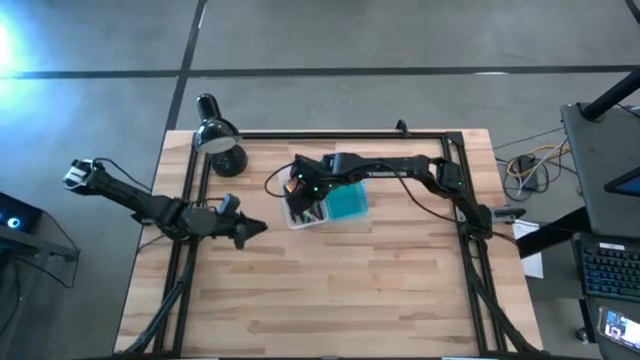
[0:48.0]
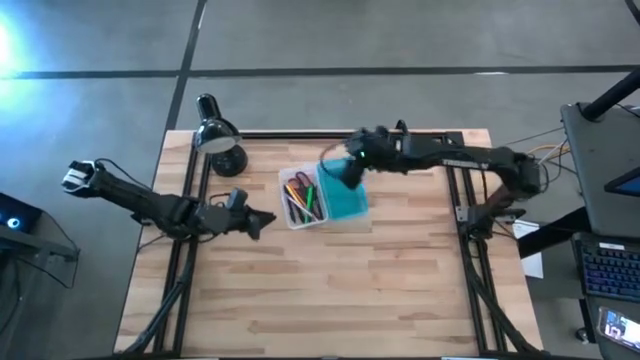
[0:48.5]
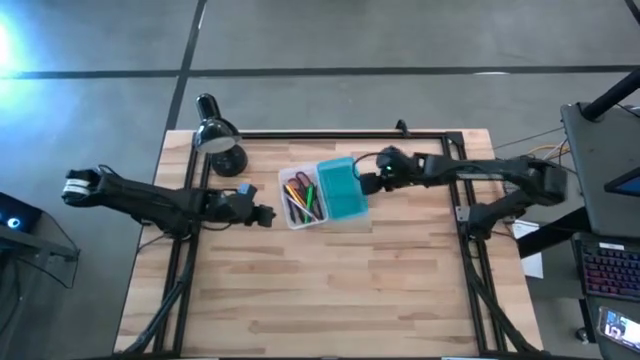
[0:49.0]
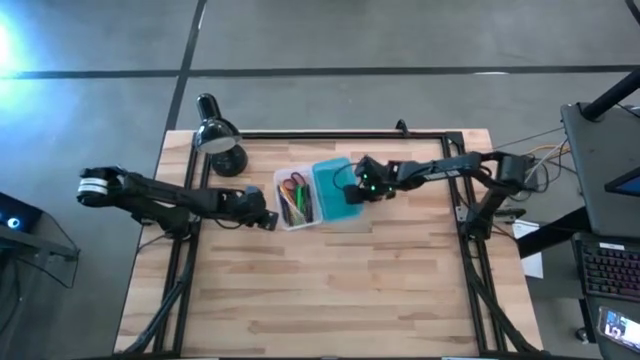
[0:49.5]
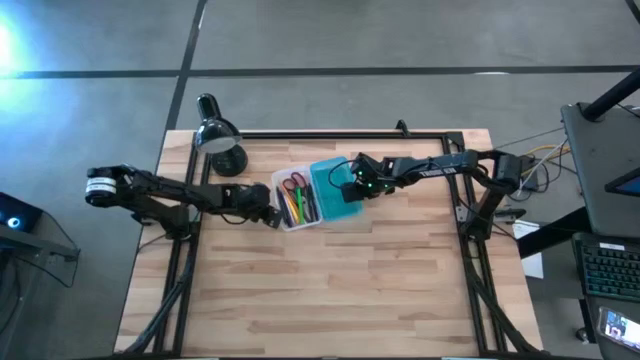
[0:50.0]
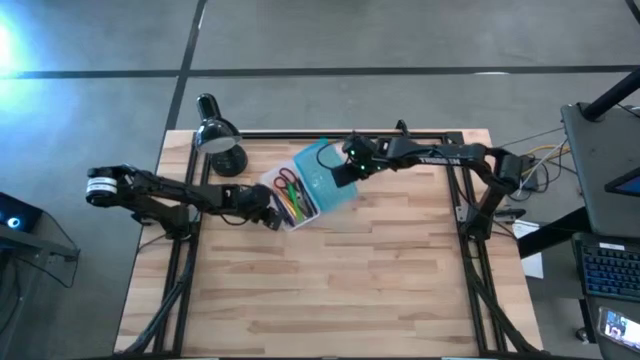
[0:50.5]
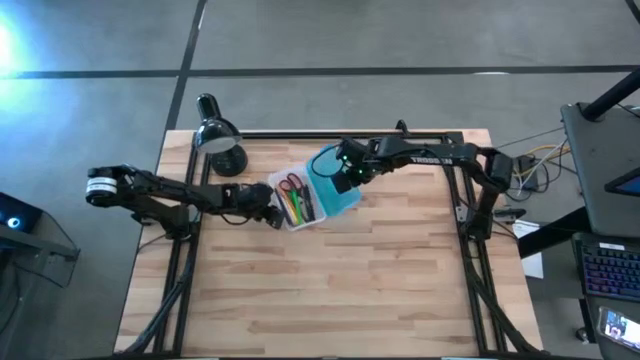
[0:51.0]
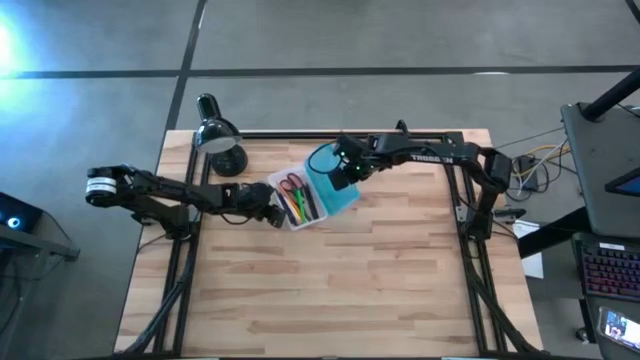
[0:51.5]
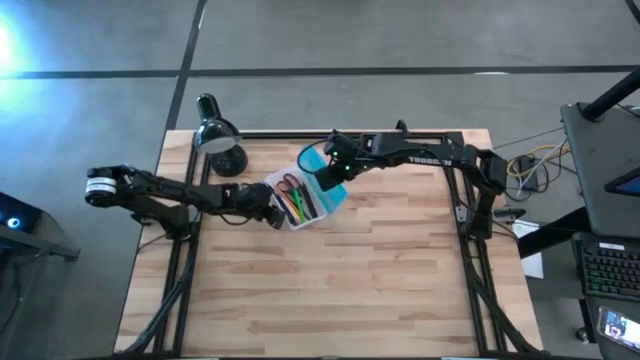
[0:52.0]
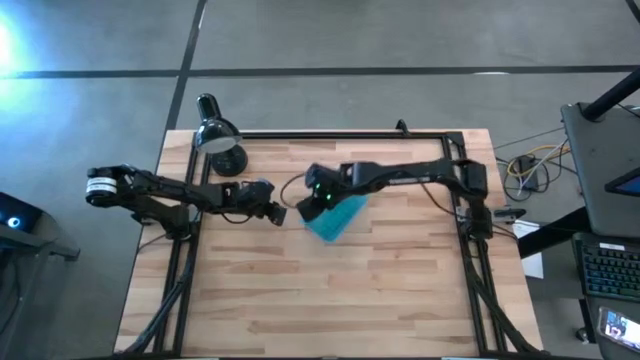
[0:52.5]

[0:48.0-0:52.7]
Task: Pick & place school supplies into a supply box
Close the supply box

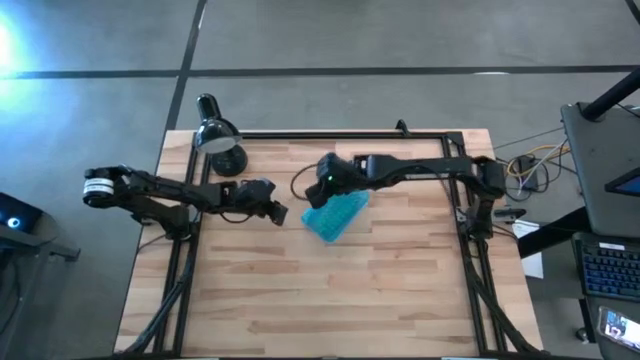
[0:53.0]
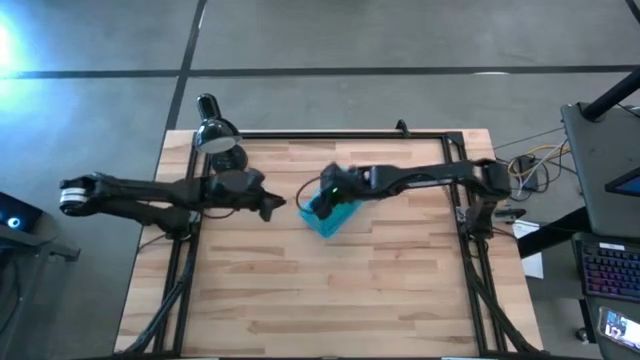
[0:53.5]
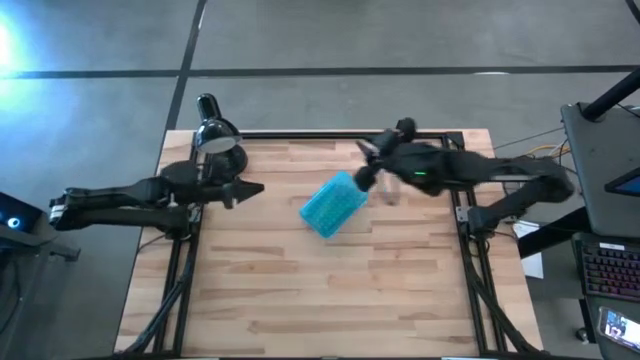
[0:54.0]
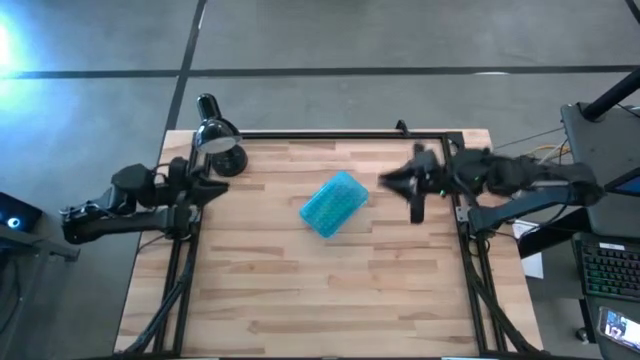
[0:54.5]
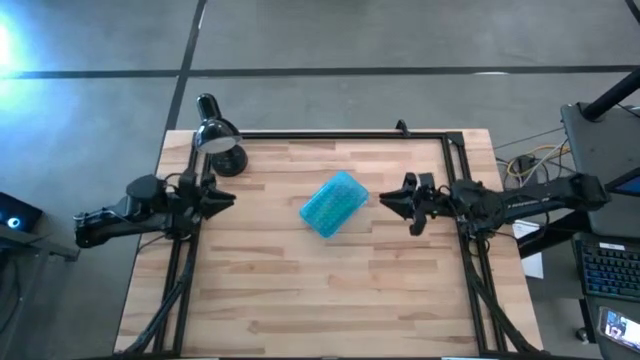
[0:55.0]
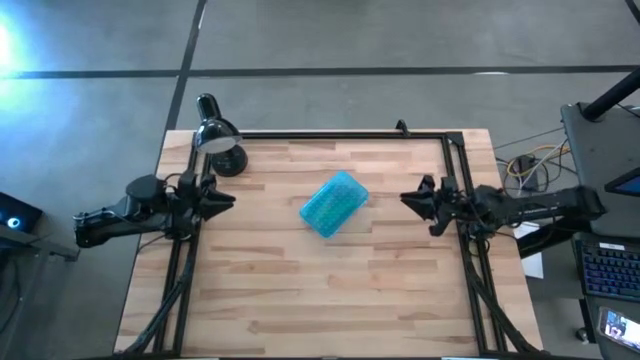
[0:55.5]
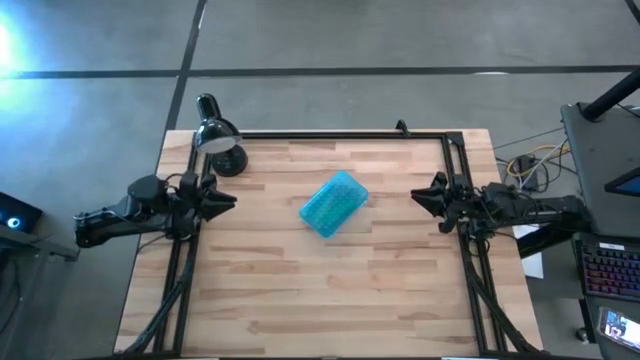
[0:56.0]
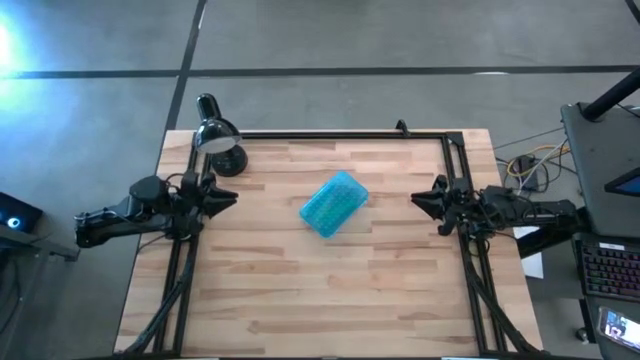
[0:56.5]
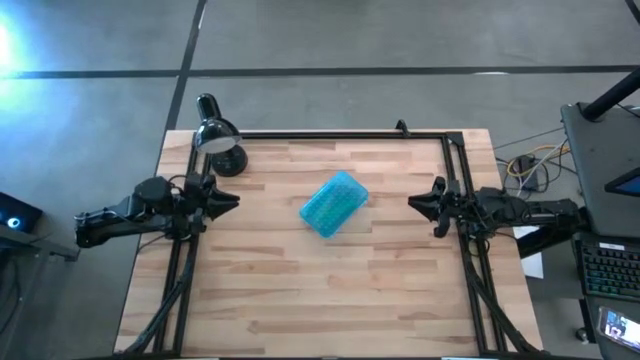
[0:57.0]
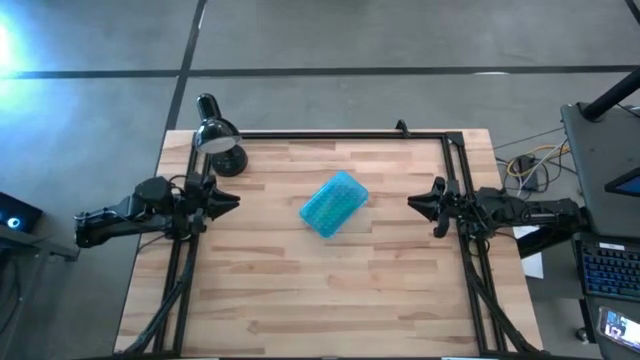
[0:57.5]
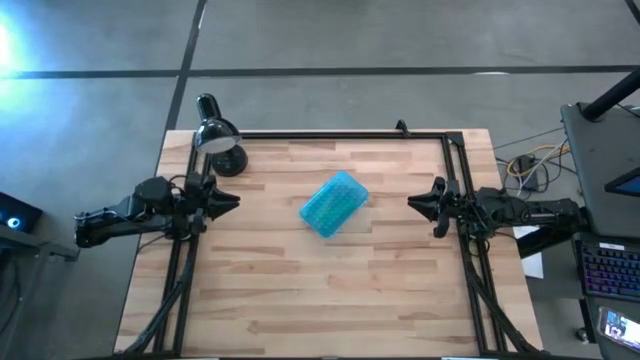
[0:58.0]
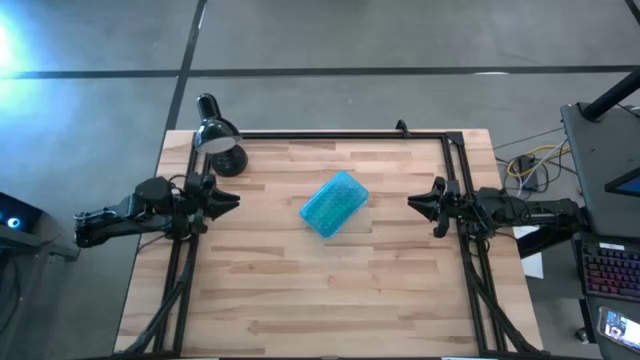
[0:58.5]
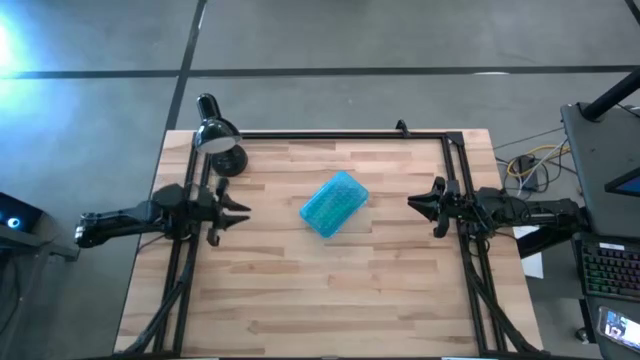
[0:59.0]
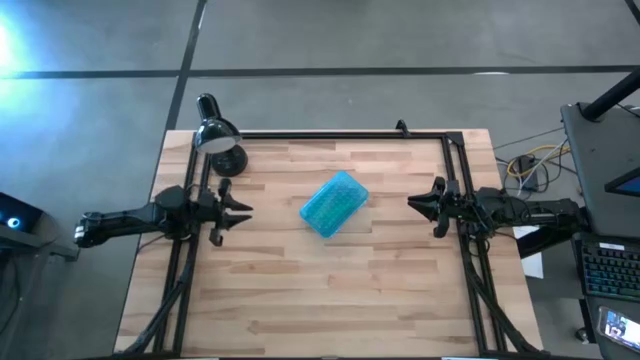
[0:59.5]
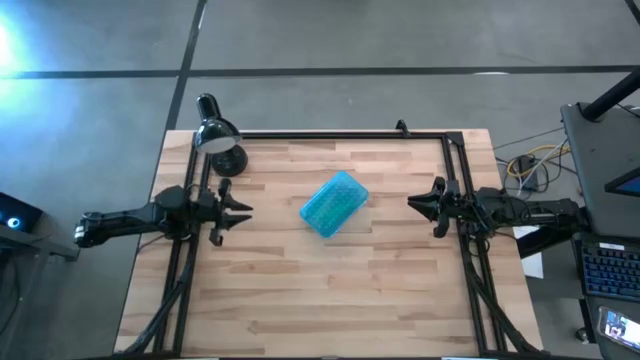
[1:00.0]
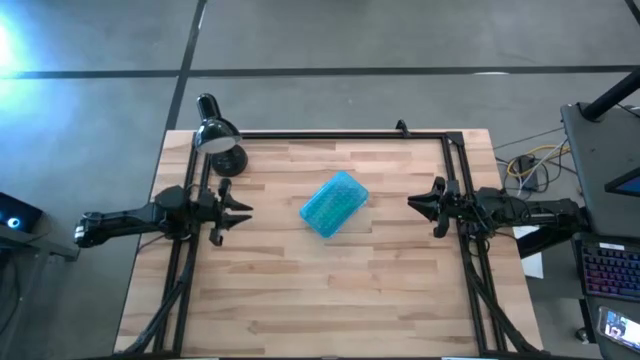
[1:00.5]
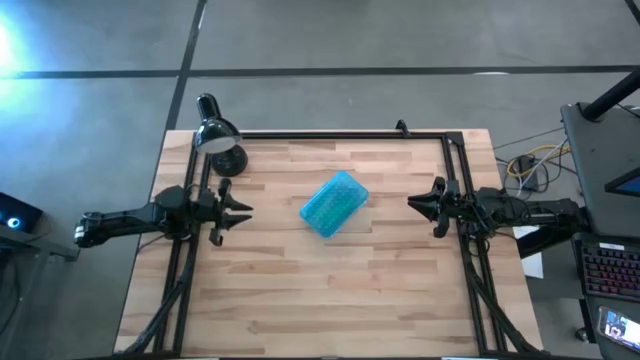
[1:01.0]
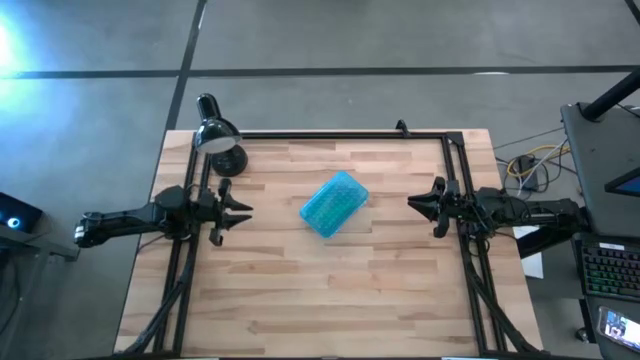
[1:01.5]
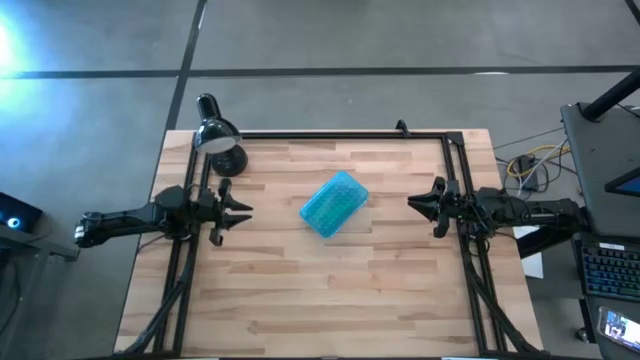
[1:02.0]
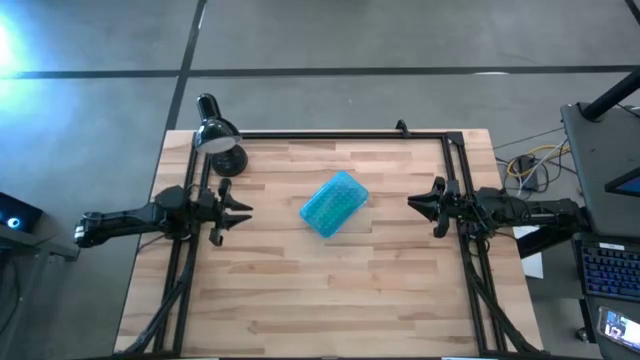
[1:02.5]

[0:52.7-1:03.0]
Return to Home Position

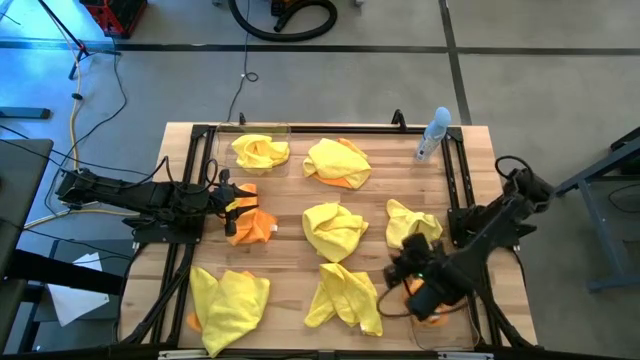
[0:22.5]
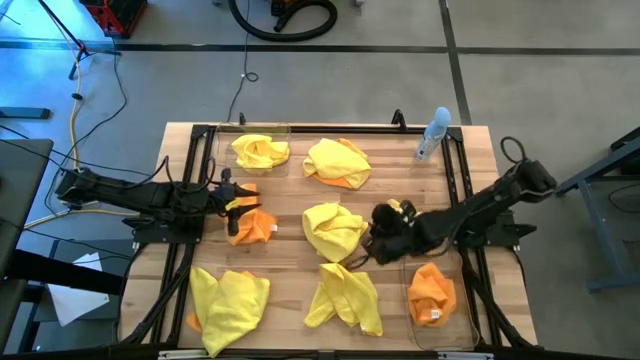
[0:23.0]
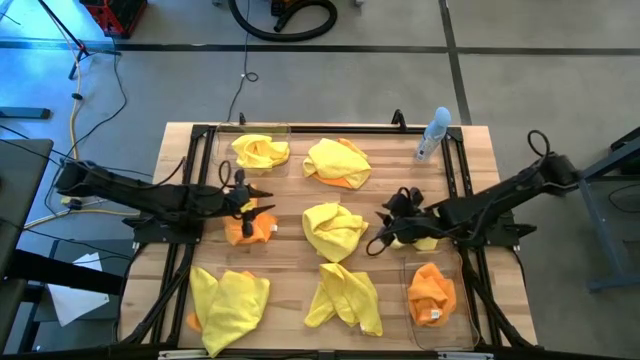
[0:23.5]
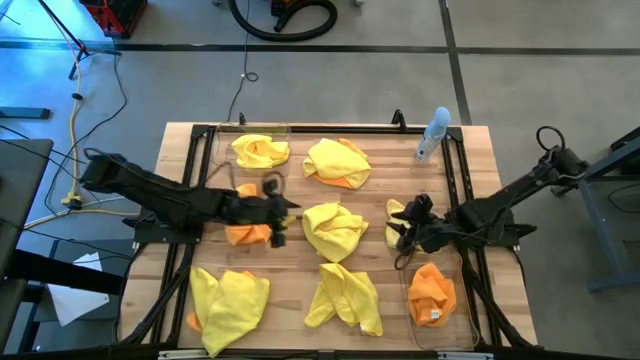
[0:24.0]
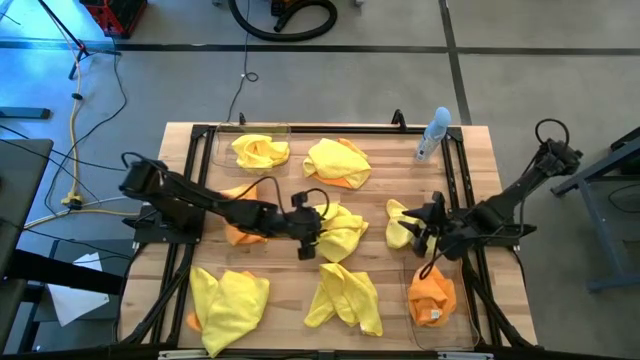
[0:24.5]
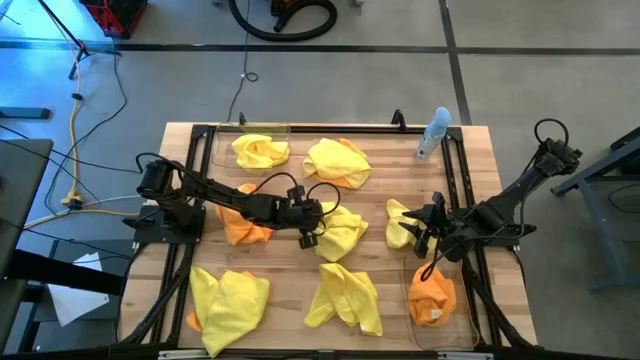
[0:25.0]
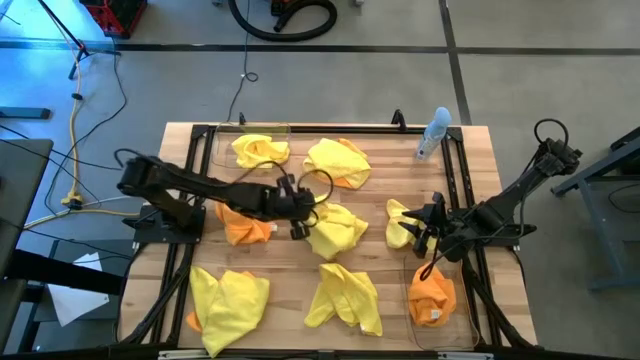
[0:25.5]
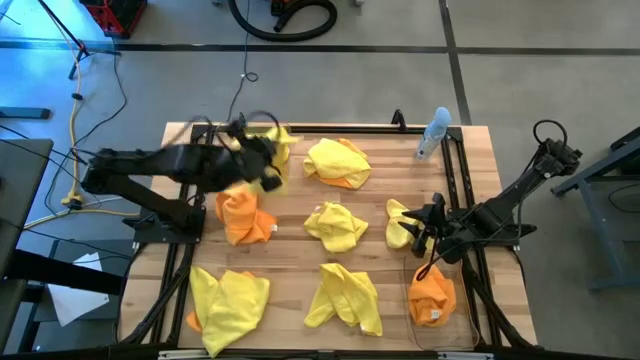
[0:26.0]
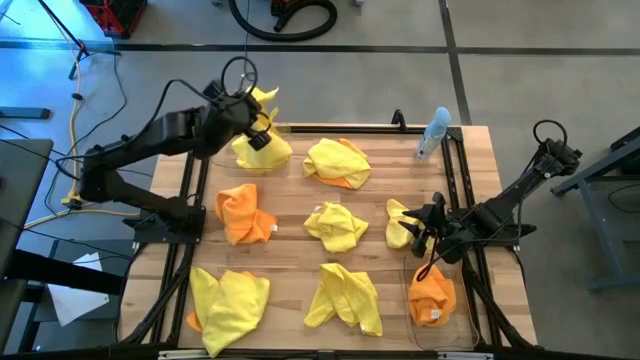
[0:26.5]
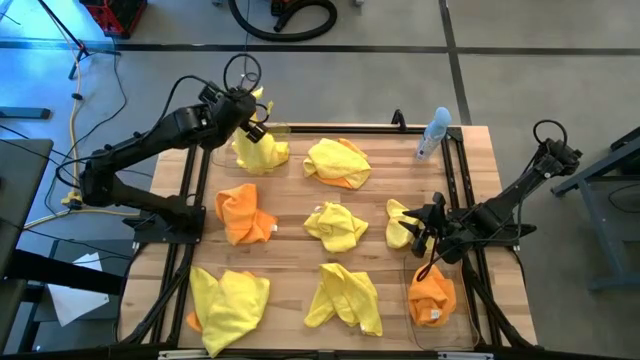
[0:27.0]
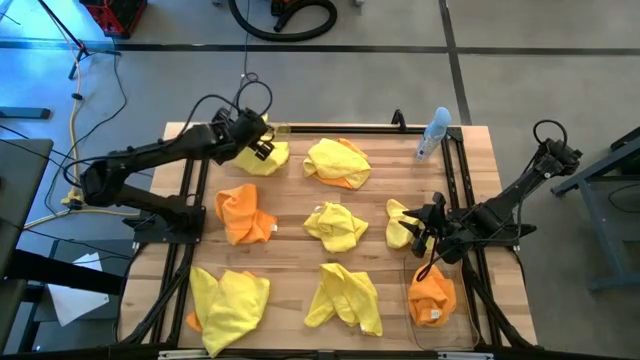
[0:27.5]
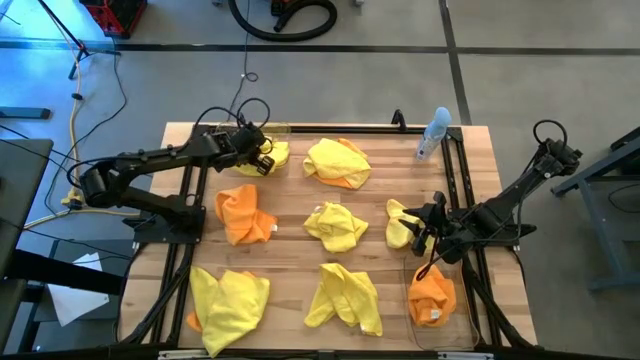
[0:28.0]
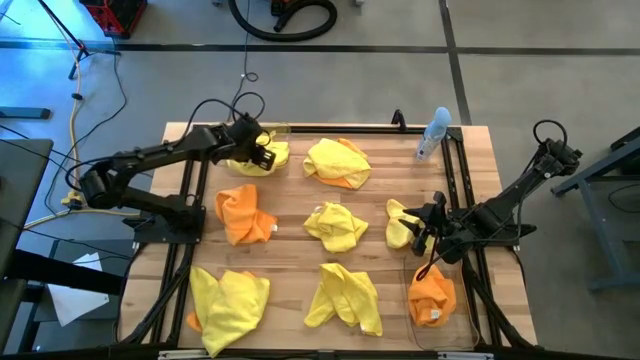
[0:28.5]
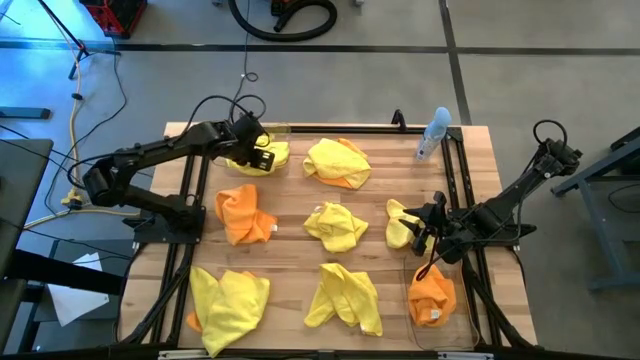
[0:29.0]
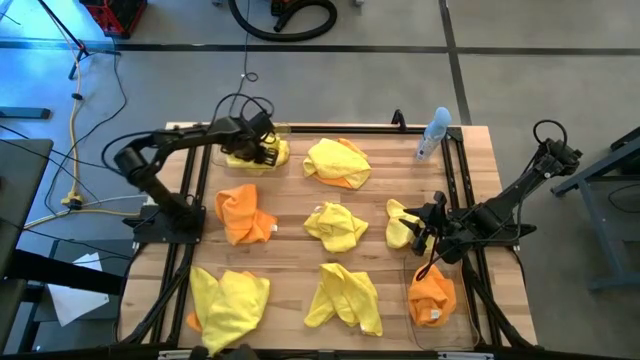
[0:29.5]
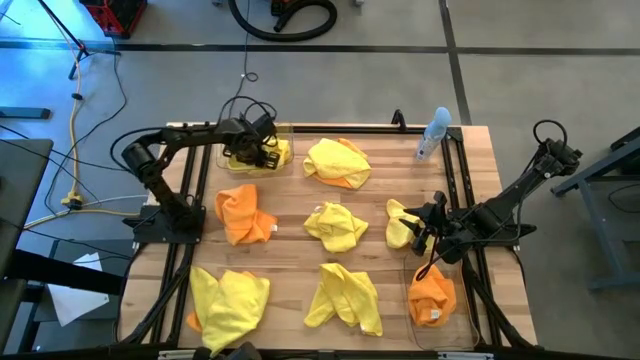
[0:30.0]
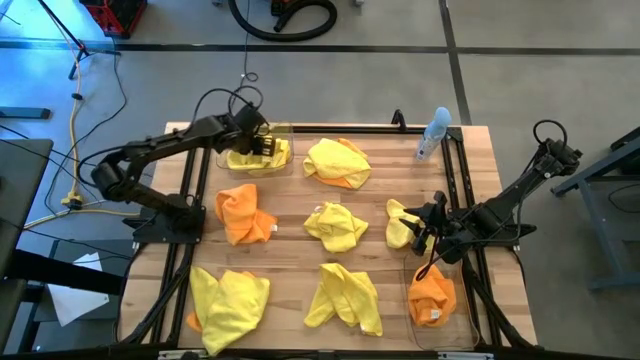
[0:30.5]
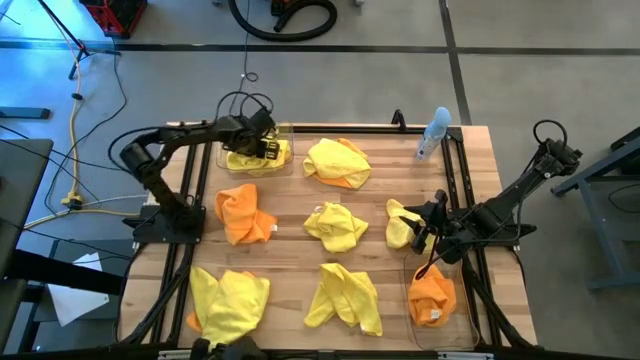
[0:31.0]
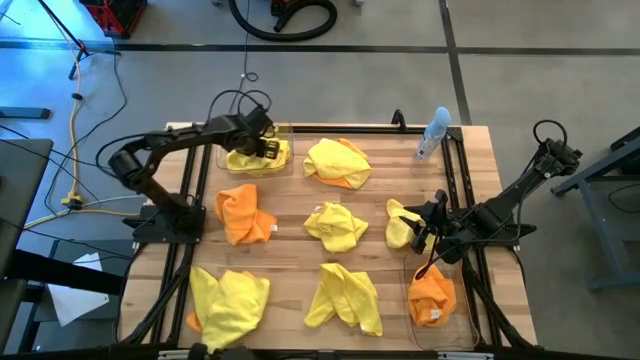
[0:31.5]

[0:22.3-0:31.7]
Task: Sort microfiber towel by color & place in baskets
Put the yellow towel into the top transparent bin
